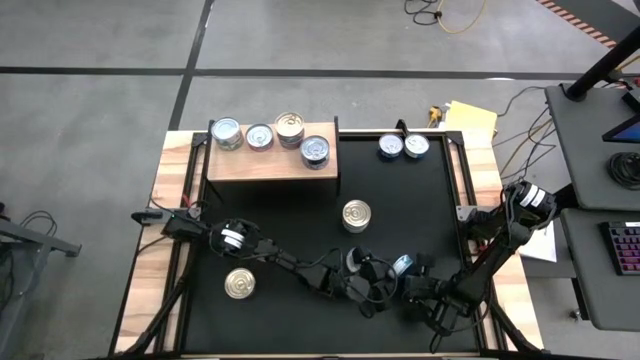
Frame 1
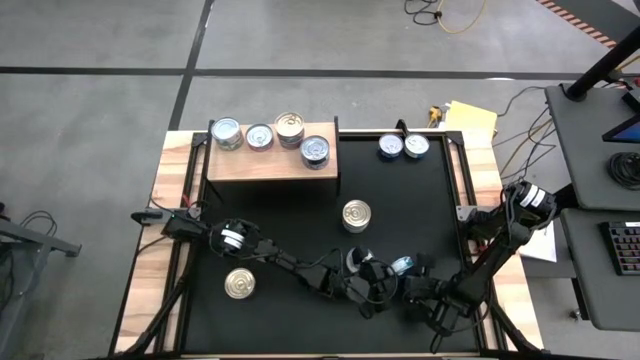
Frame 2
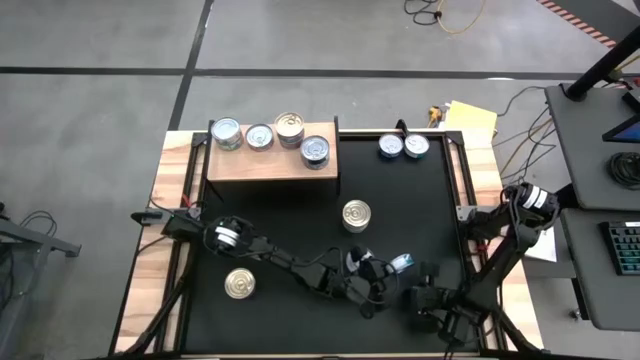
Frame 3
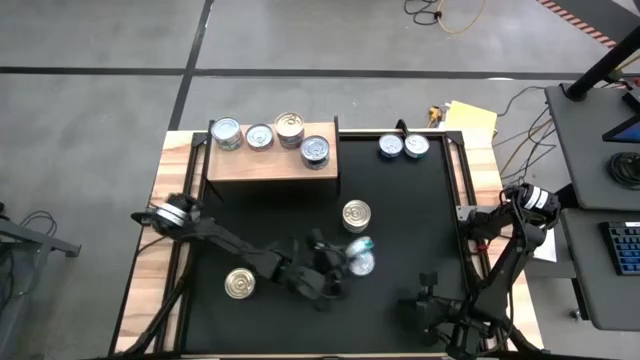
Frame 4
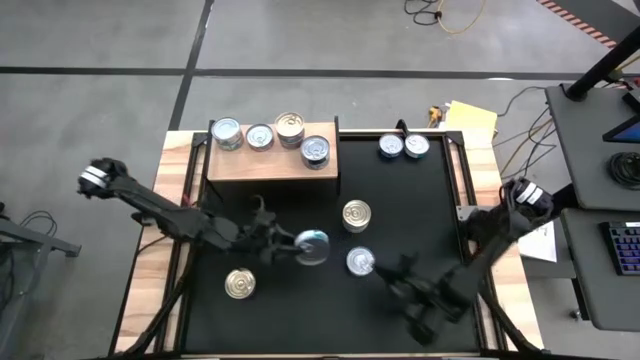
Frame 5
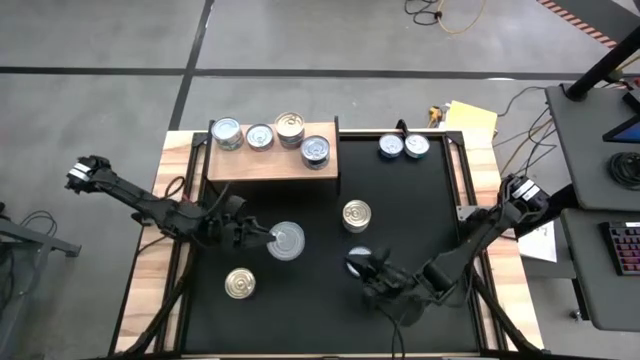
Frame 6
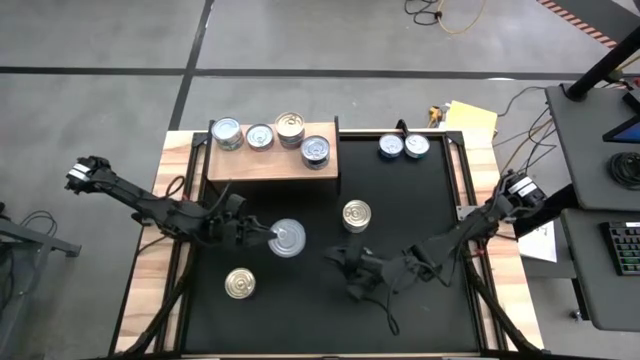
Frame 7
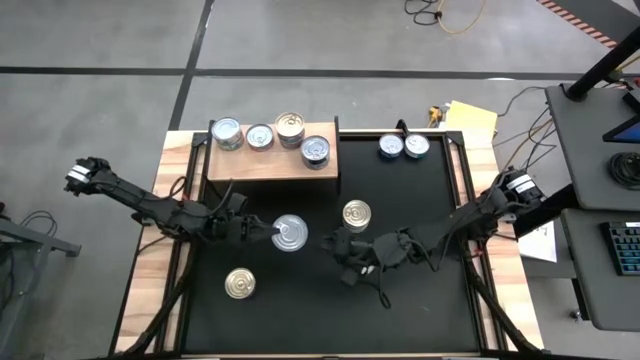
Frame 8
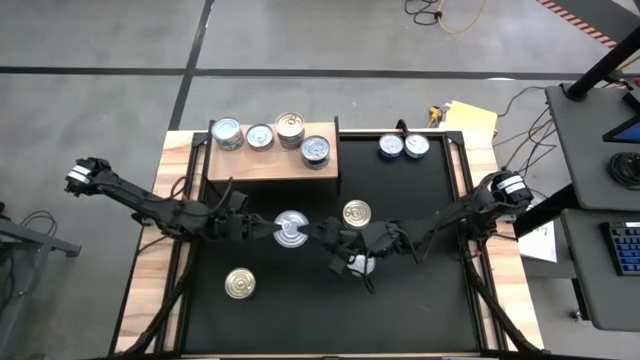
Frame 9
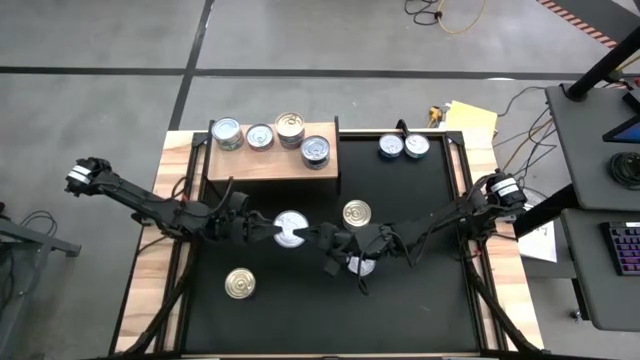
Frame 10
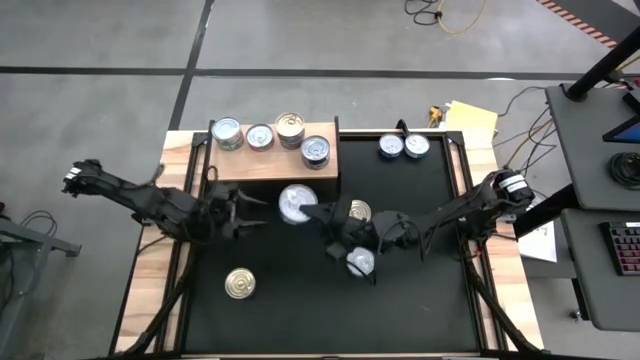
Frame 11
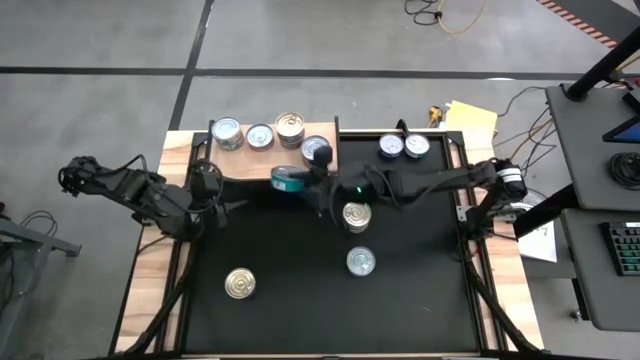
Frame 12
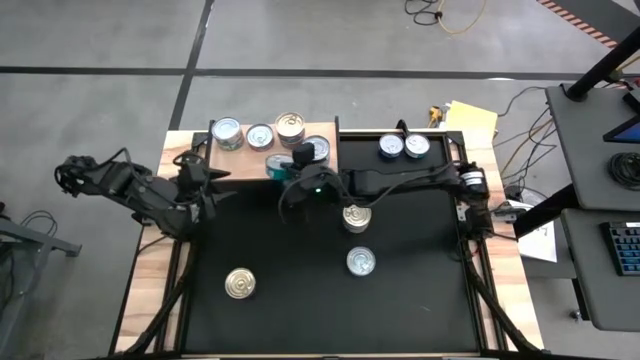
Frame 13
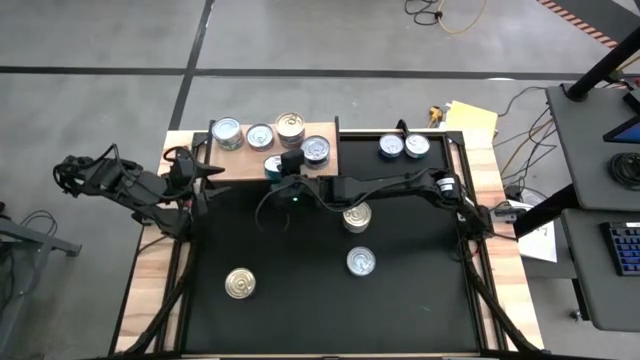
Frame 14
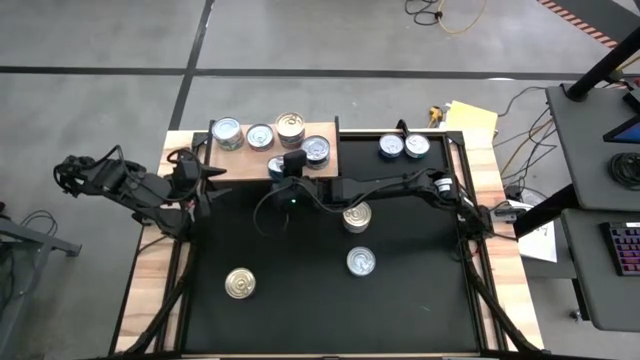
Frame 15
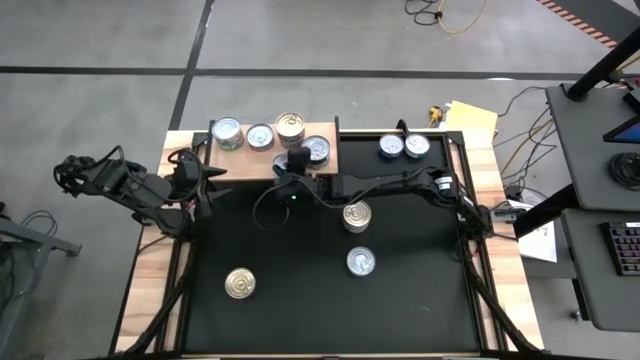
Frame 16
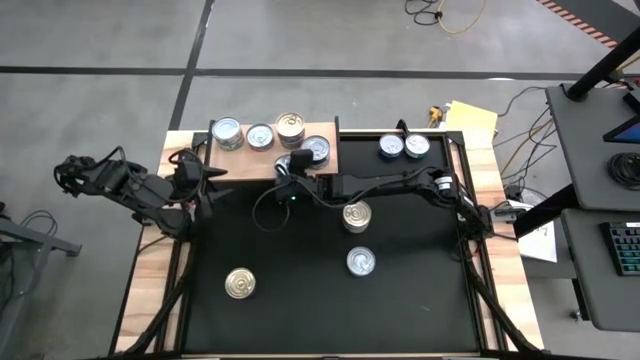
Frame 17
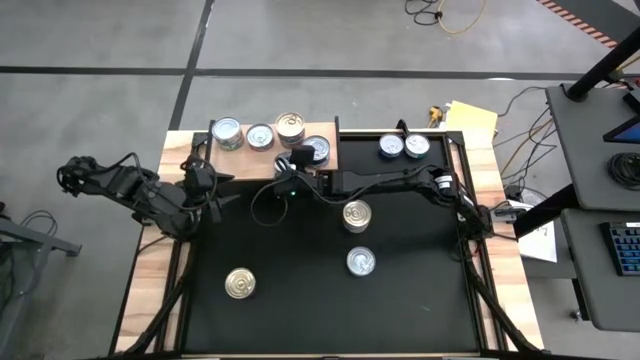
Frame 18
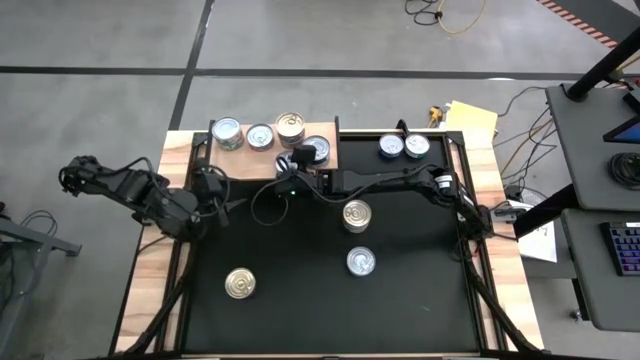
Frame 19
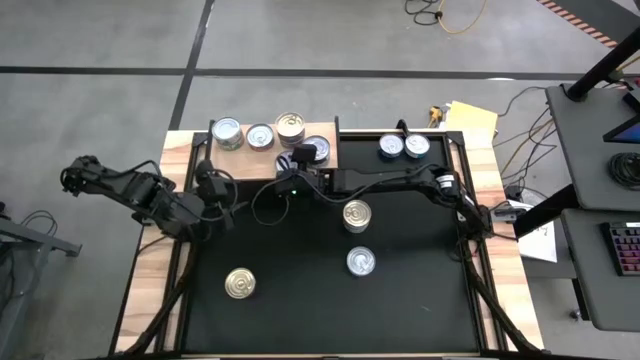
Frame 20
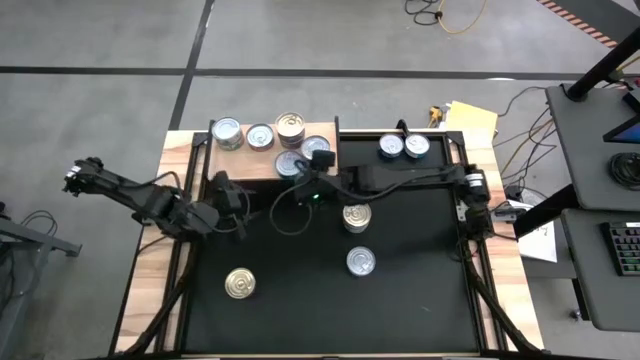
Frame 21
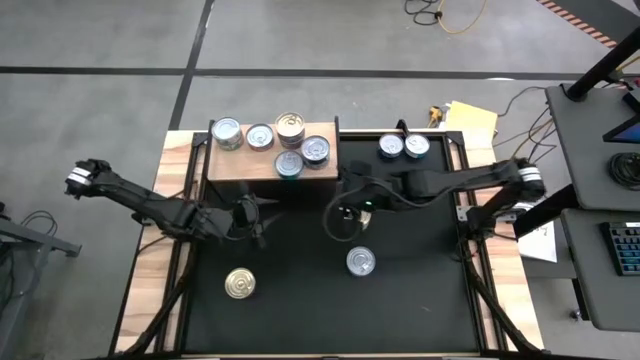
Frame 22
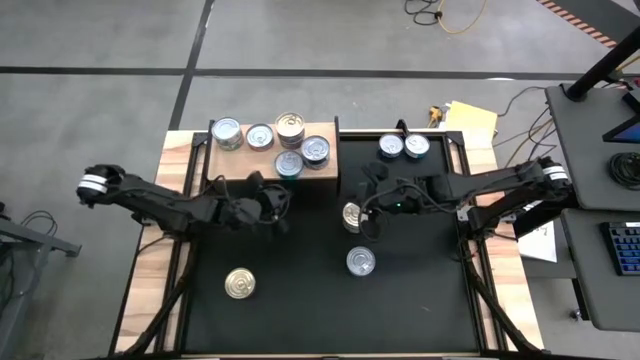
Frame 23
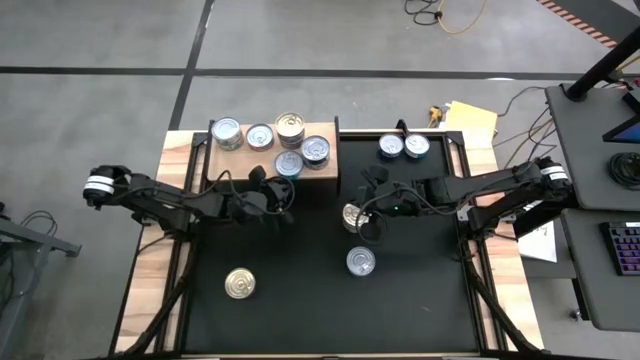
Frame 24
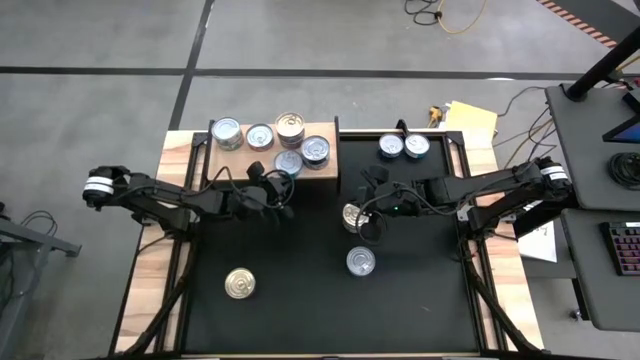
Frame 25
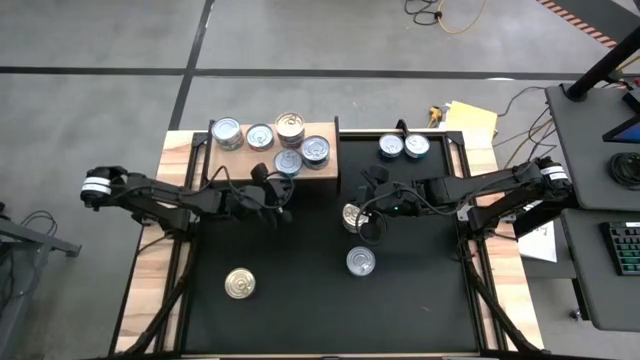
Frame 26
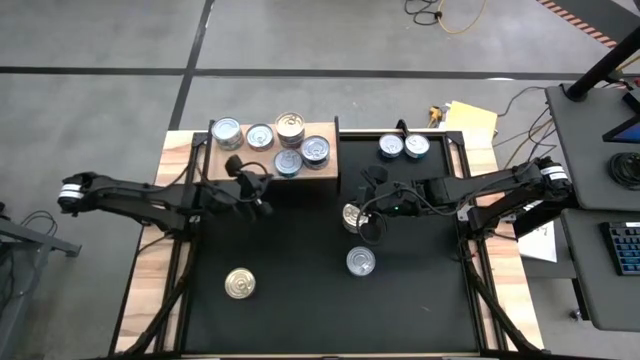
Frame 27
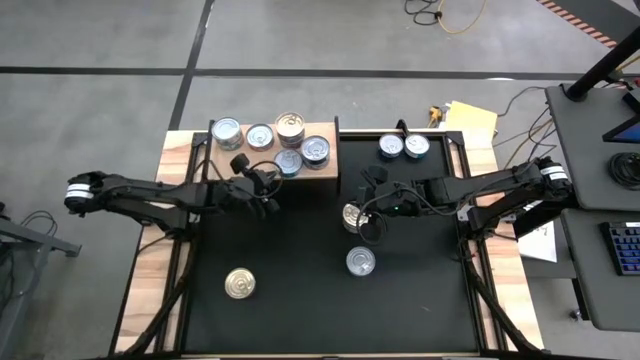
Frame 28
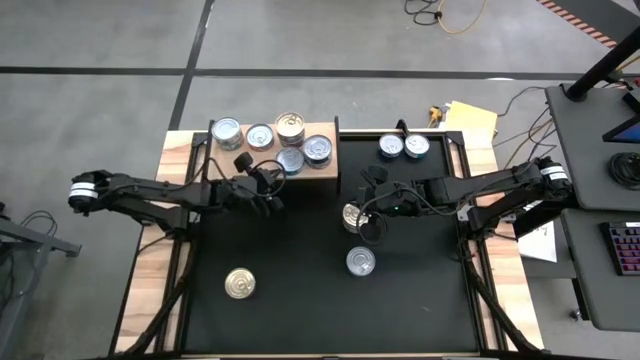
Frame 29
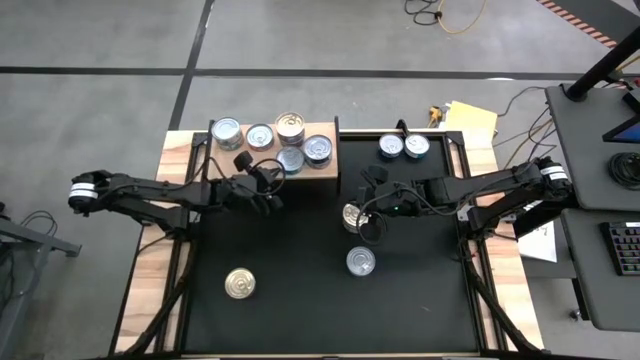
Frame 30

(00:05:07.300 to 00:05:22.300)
Task: Stack canned seafood by type on shelf
Put the green/blue tuna can on the shelf

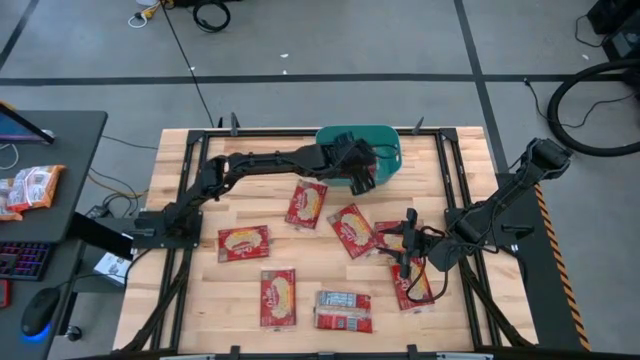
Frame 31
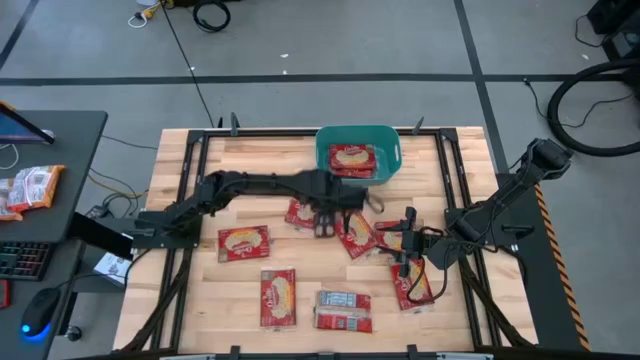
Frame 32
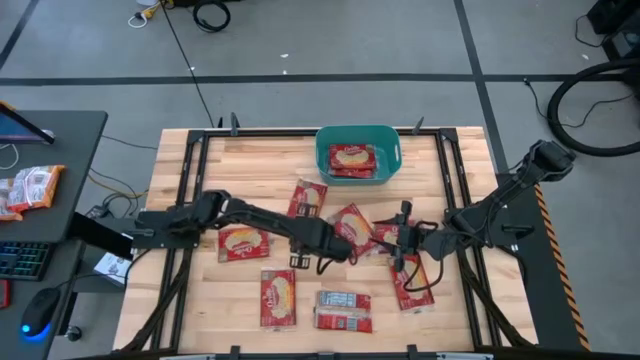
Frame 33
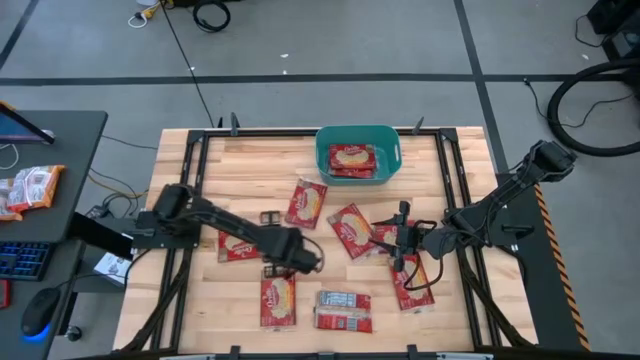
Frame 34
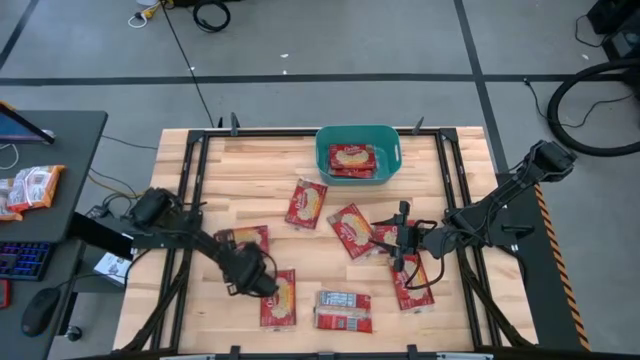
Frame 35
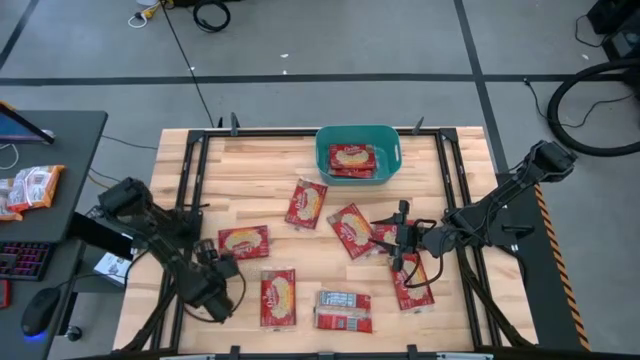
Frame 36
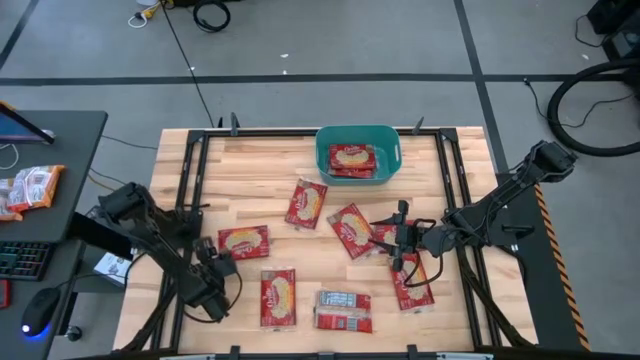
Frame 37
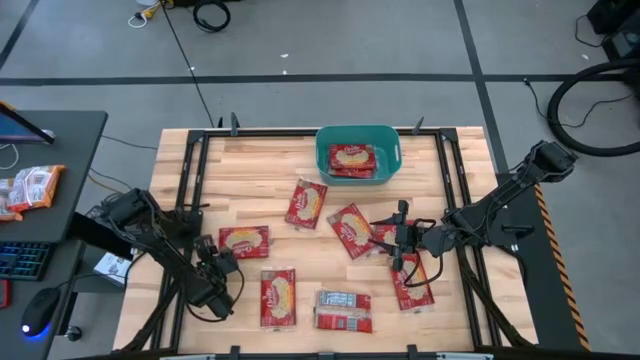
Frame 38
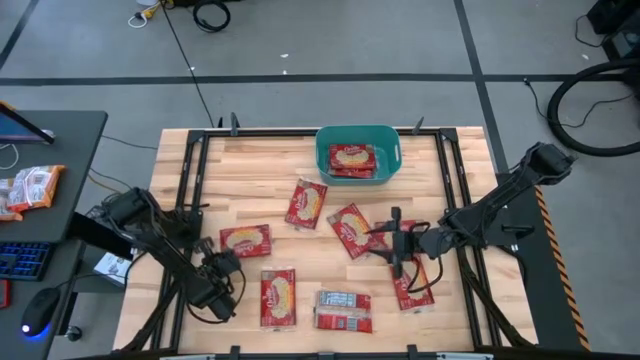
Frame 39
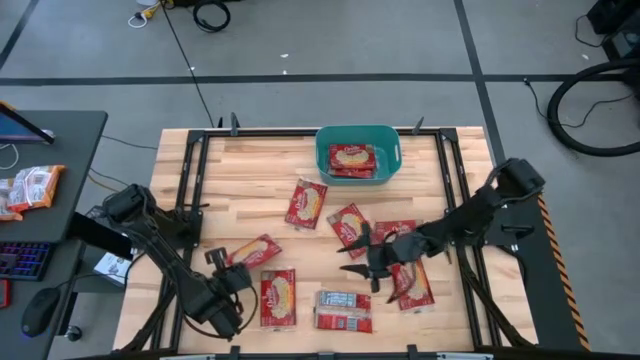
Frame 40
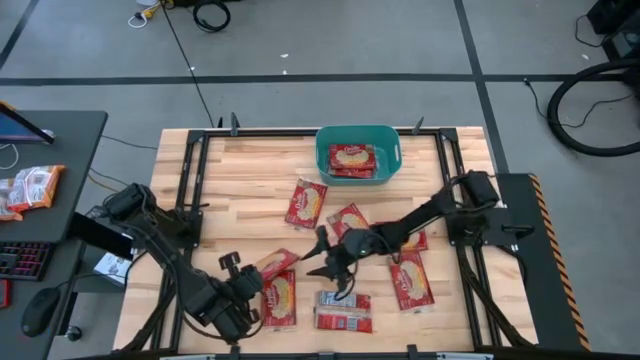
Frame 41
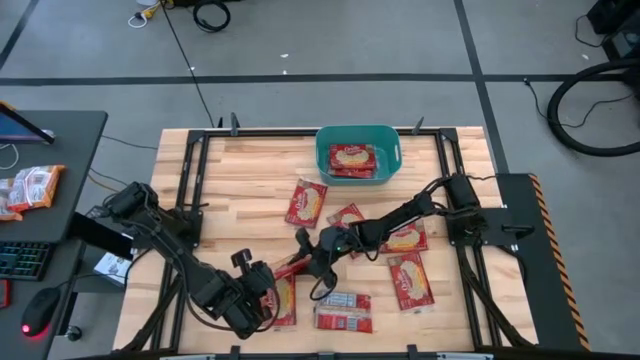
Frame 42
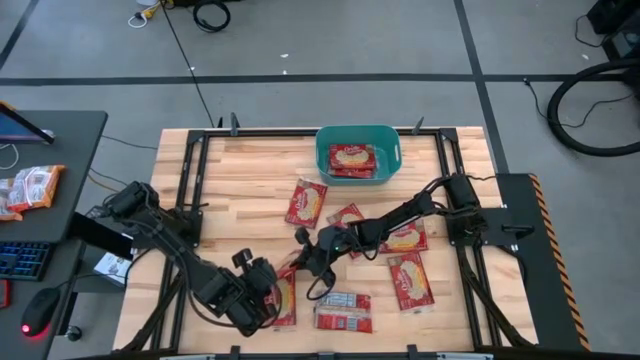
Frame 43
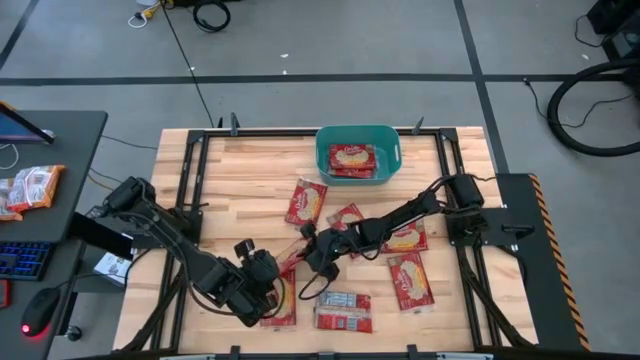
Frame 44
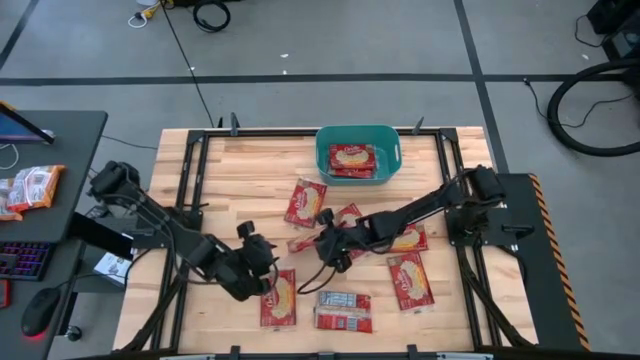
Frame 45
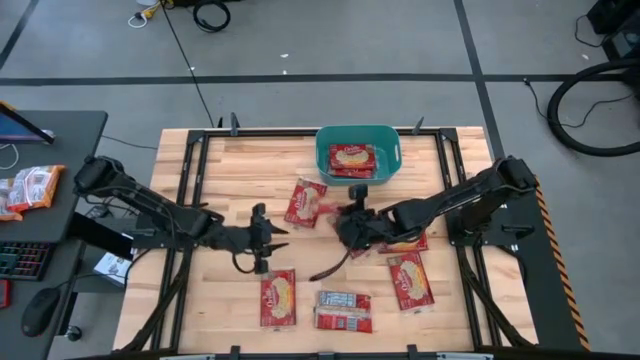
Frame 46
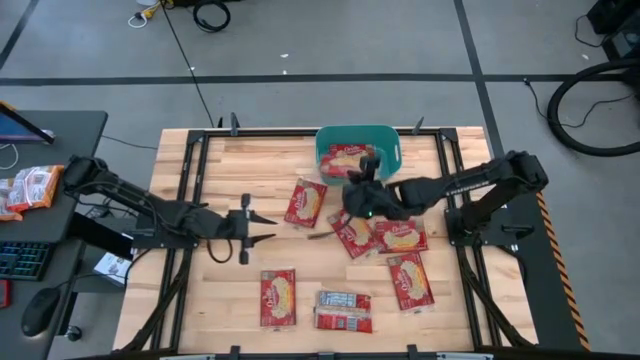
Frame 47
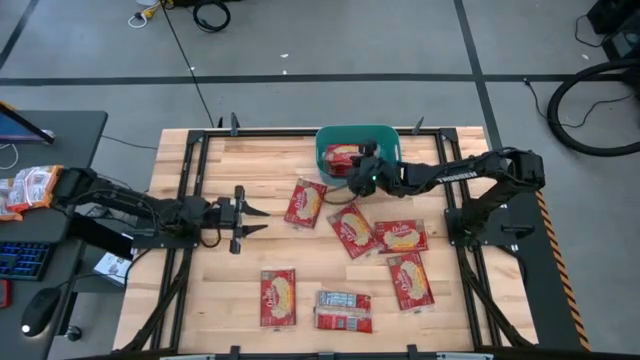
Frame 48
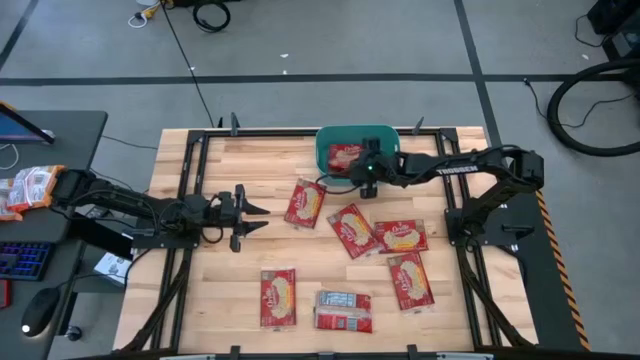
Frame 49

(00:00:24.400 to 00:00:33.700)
Task: Sort popcorn bags into baskets
Put the red popcorn bag into the blue bin
